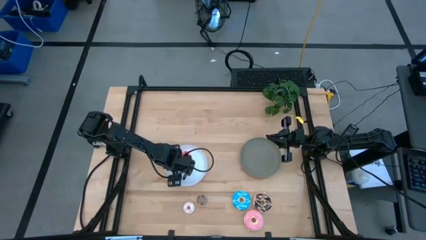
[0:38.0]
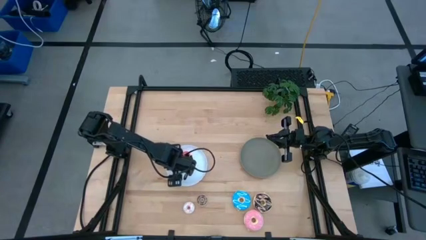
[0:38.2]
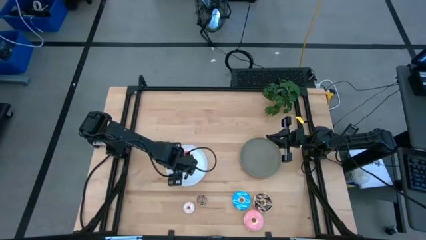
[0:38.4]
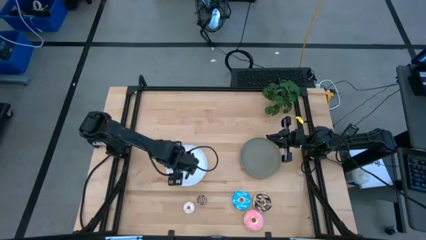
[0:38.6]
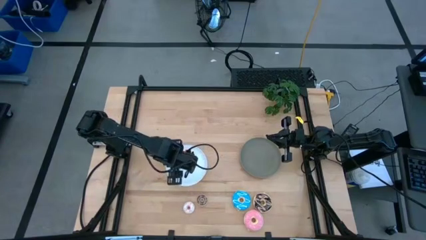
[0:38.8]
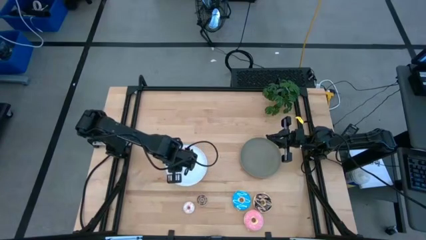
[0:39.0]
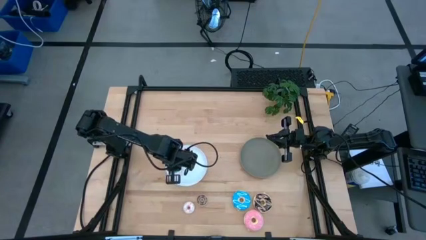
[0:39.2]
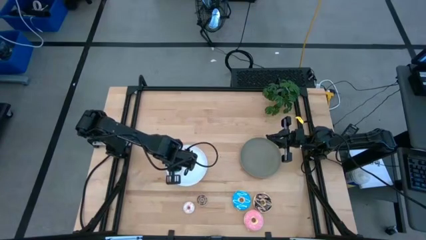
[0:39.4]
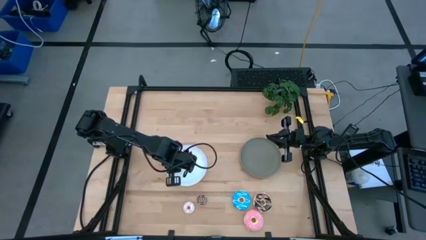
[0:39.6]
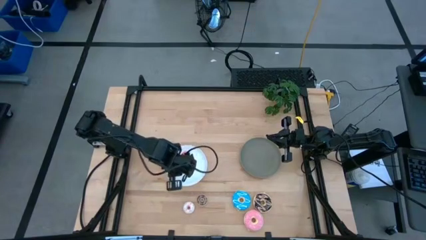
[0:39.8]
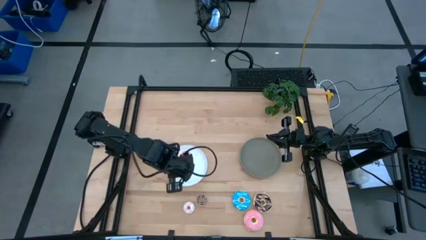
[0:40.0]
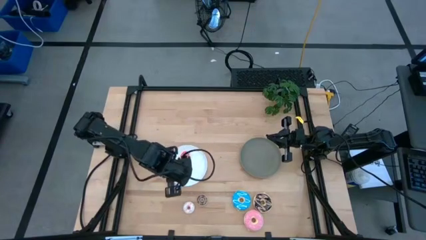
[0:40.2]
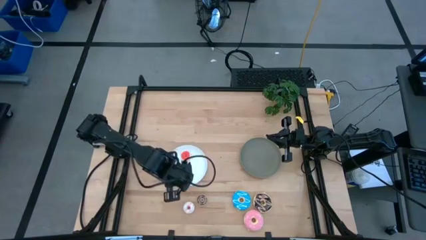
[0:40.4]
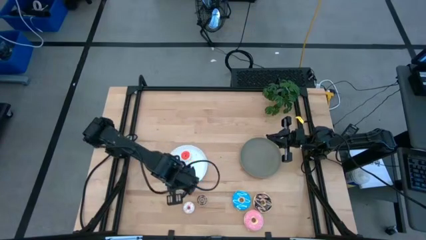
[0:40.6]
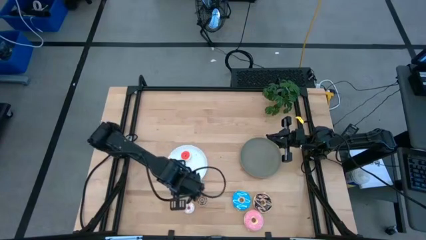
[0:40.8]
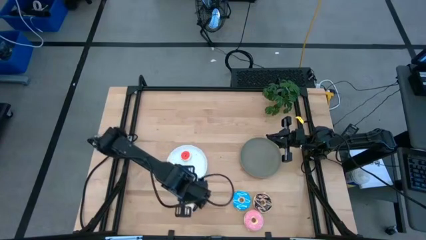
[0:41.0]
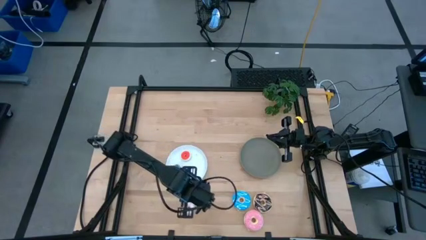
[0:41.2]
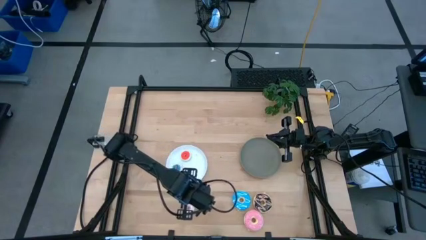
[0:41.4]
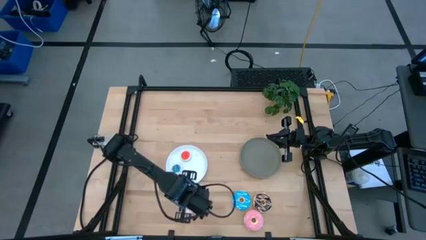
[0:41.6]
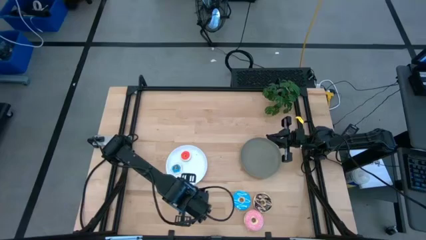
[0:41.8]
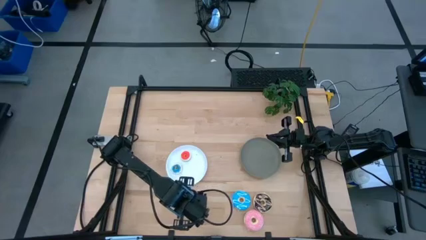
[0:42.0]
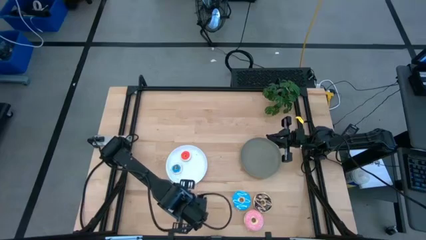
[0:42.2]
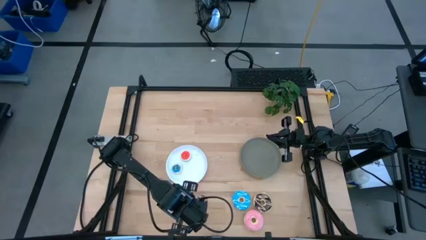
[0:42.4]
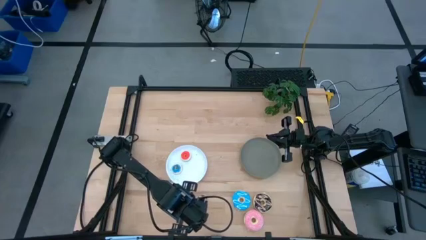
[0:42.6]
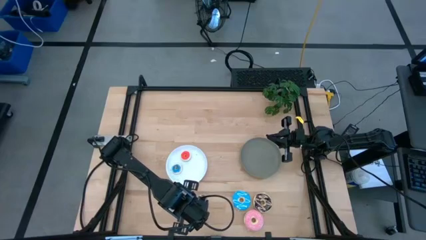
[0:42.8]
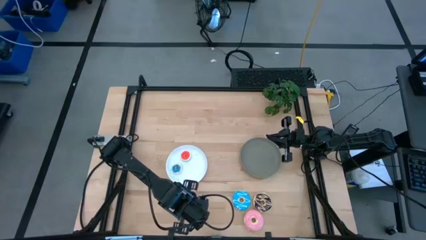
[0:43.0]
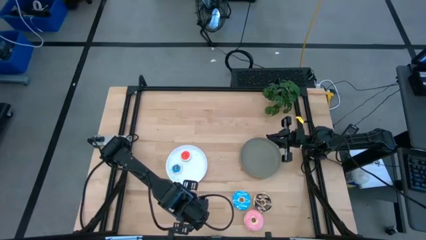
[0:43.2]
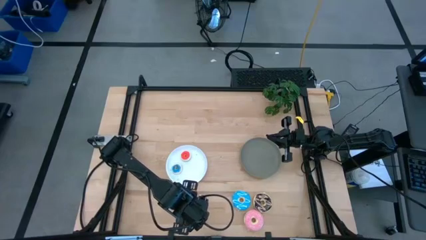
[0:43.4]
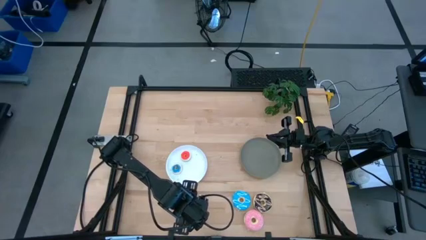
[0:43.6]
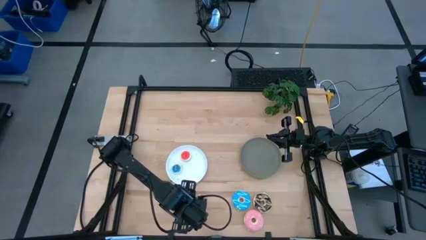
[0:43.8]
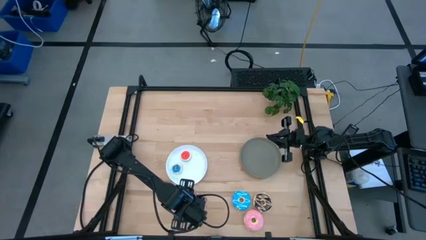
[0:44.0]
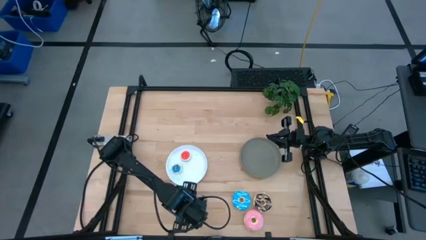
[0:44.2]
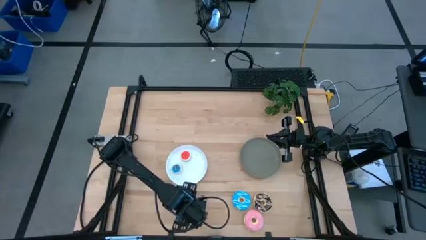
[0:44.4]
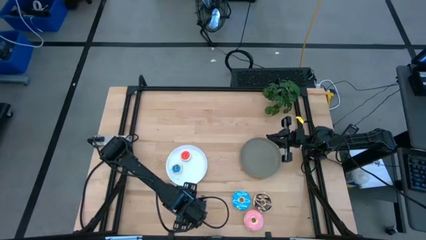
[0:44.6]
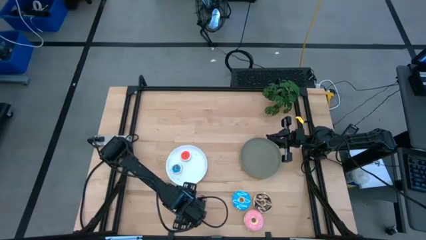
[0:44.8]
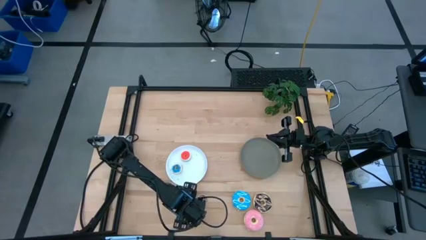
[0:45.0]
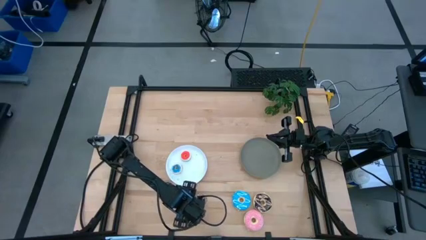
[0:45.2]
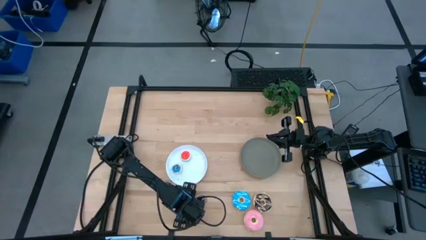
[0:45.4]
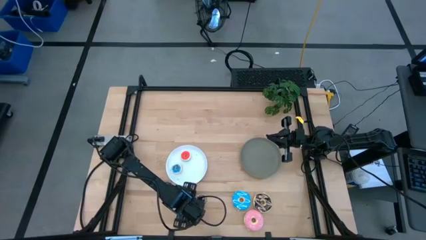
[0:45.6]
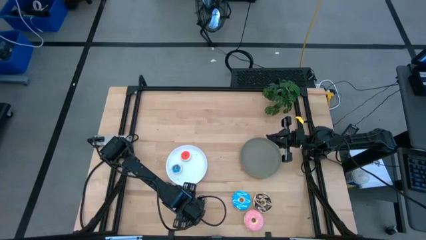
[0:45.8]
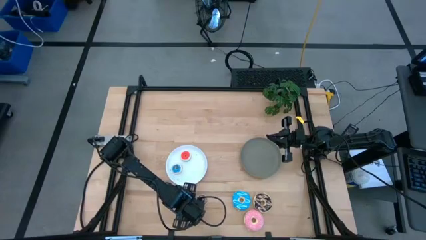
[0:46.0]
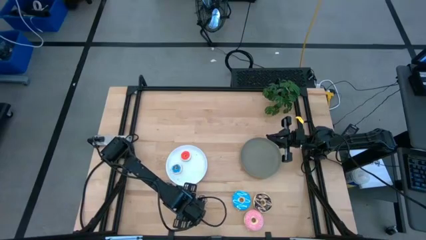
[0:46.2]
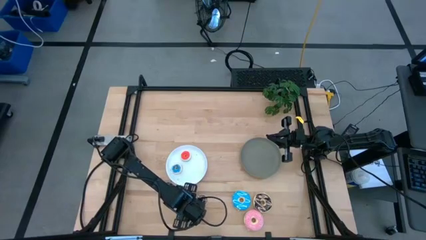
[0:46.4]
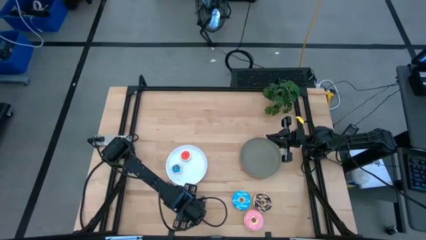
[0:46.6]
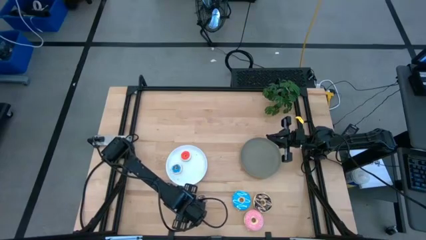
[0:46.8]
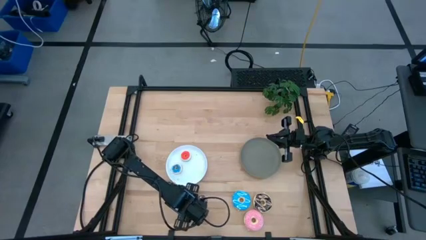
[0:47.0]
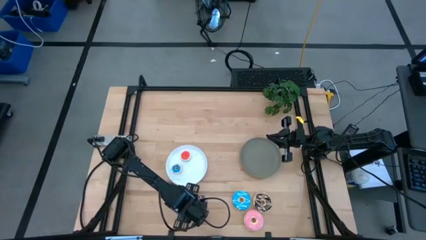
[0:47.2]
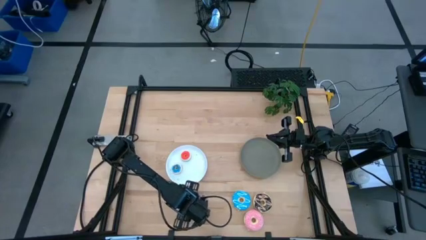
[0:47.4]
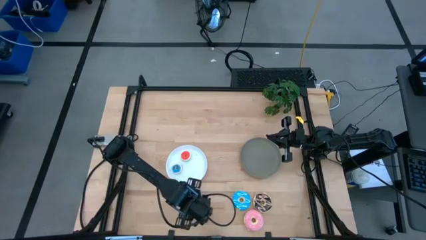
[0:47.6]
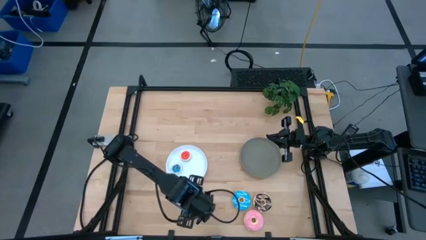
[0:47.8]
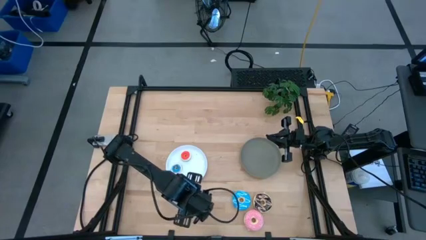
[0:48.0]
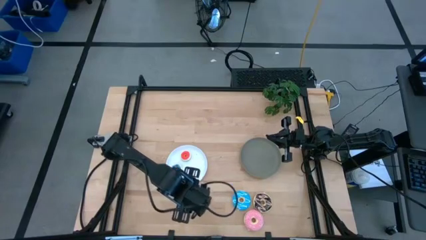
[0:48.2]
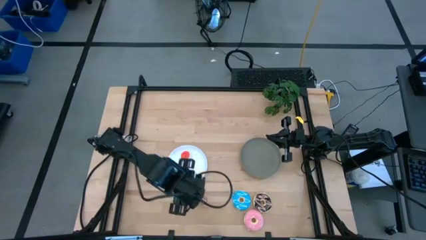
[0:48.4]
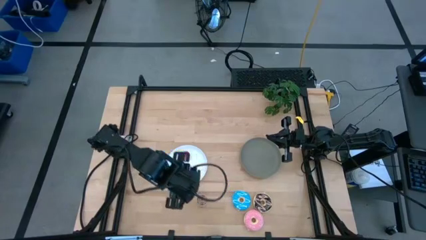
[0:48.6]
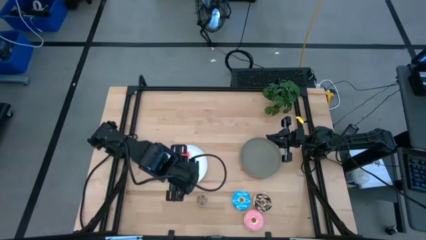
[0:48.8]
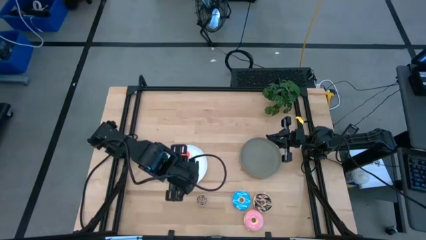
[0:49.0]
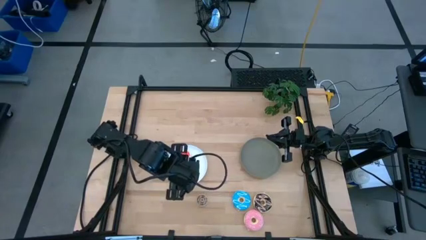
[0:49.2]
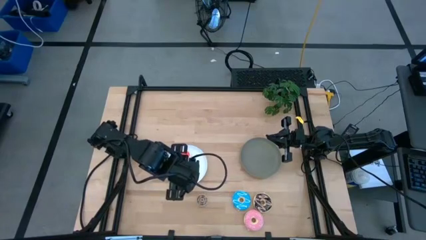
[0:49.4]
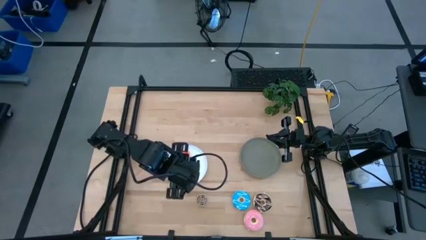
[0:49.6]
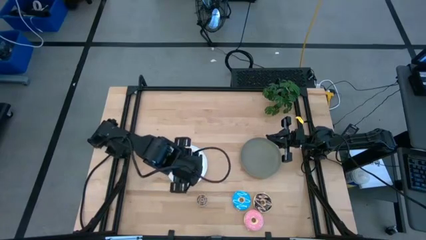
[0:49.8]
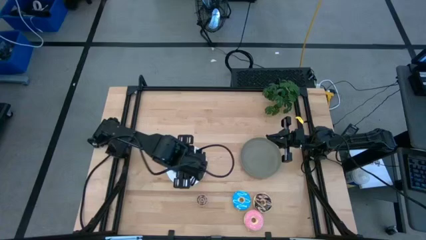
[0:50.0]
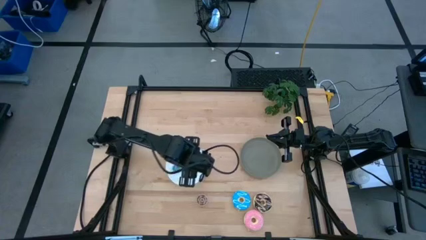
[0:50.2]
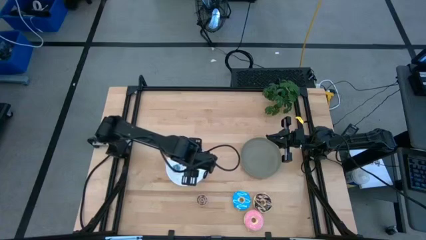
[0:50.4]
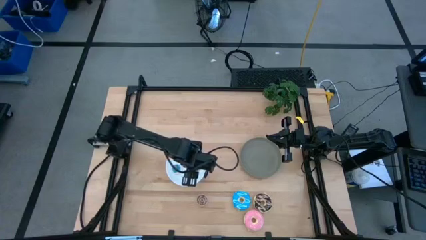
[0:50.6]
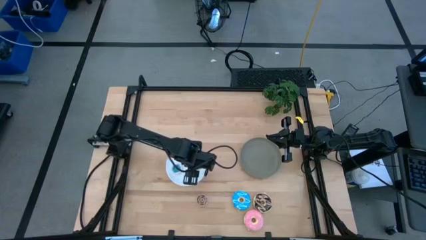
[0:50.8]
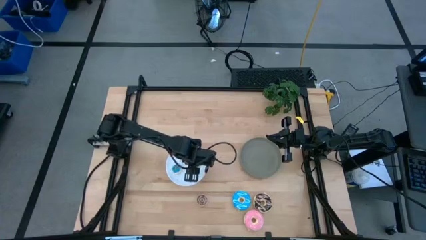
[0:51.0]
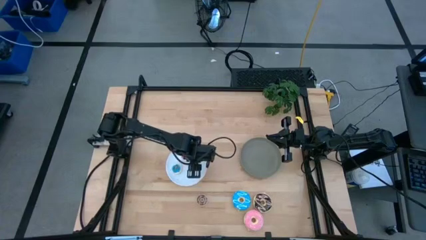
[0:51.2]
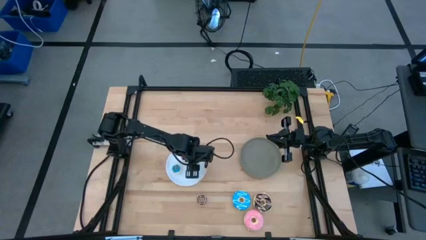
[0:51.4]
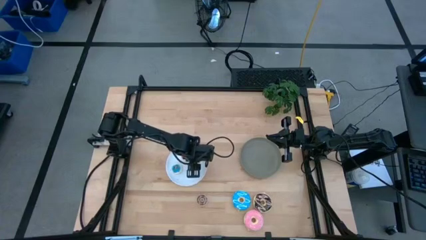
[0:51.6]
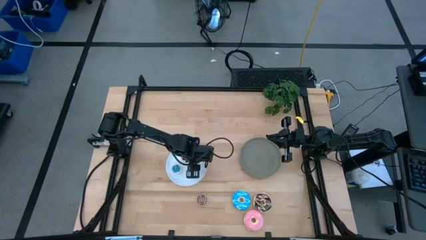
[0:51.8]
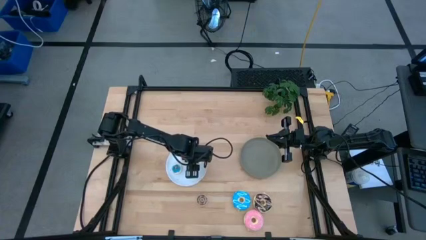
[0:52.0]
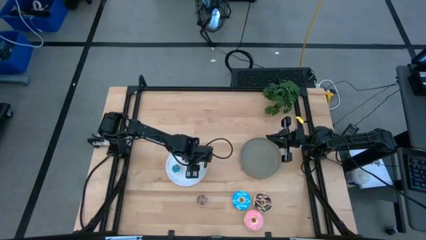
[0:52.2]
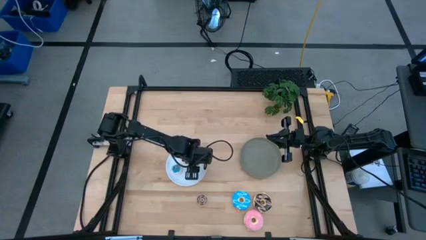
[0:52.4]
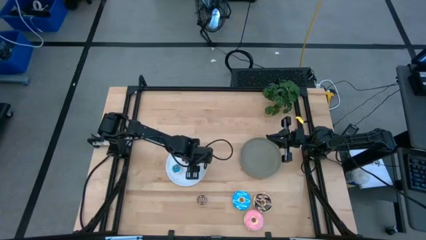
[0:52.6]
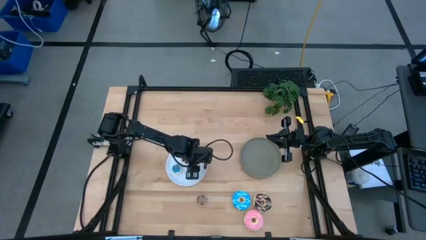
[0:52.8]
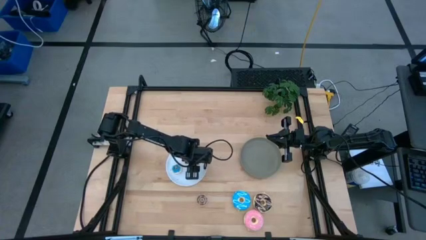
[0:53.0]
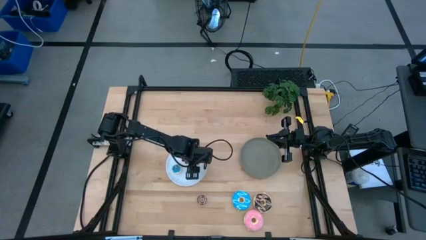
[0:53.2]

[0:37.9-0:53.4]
Task: Pick & Place donuts
Put the small white donut on the white plate

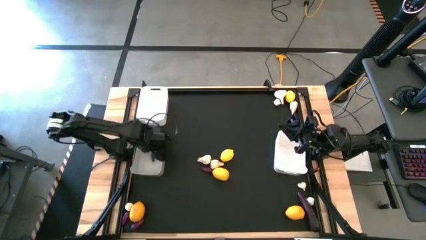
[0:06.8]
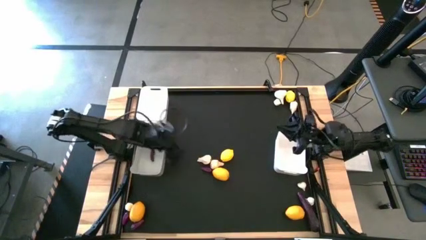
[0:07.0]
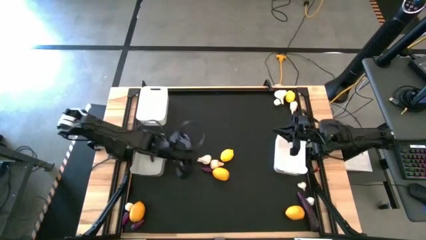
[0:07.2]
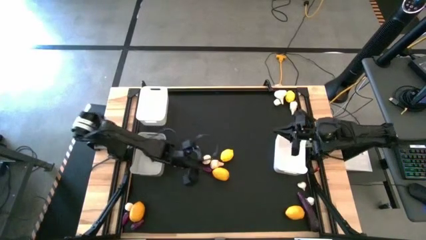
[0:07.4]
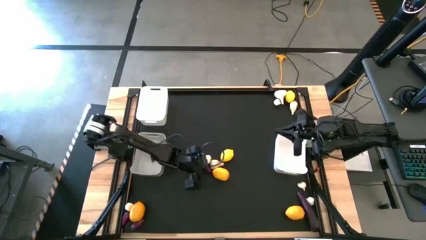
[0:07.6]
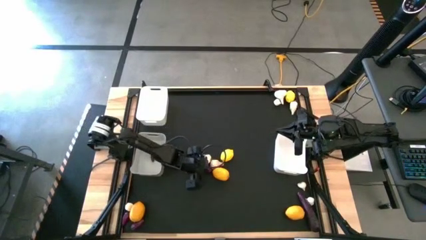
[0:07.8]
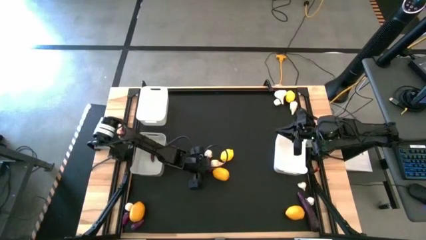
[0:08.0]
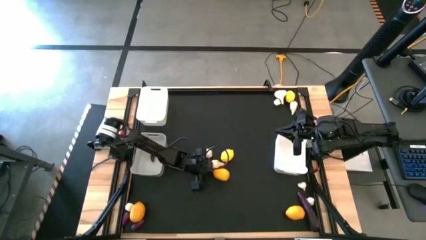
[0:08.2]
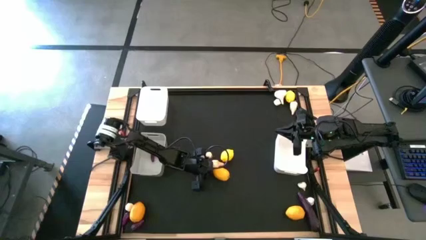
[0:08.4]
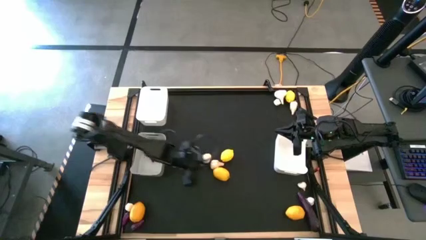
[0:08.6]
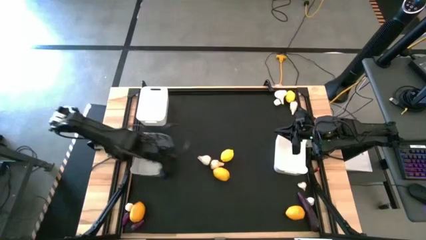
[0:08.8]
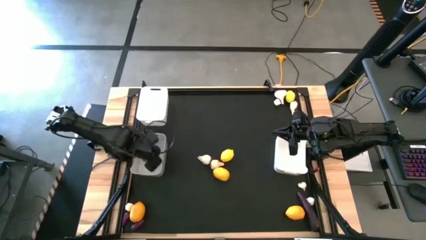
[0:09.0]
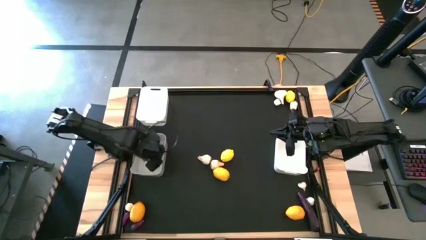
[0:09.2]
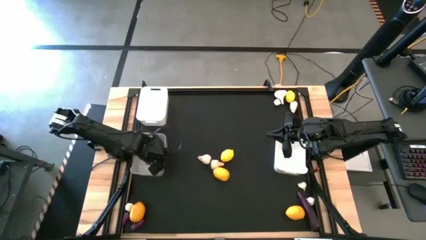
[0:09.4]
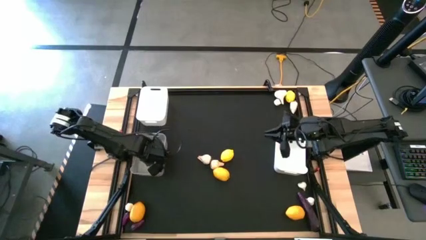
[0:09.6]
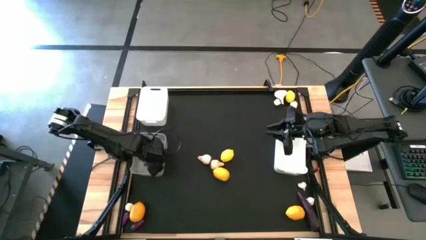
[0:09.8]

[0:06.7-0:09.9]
Task: Sort produce into baskets
Put the violet eggplant into the gray bin
